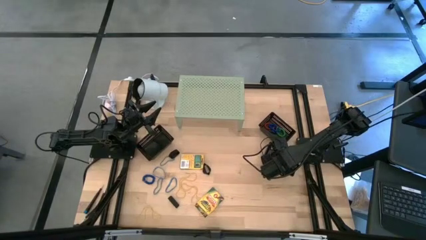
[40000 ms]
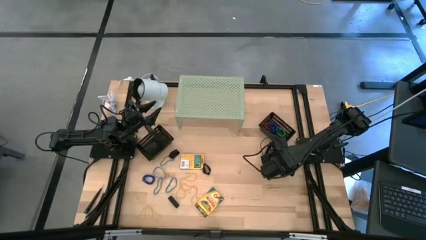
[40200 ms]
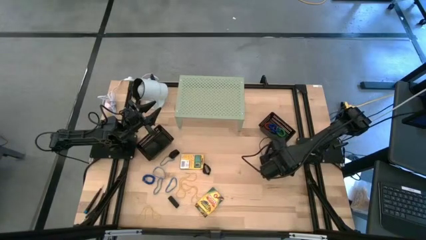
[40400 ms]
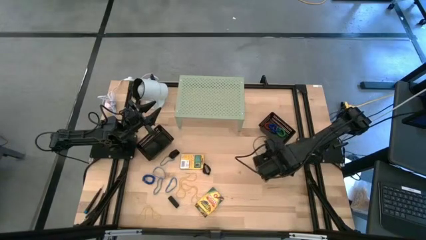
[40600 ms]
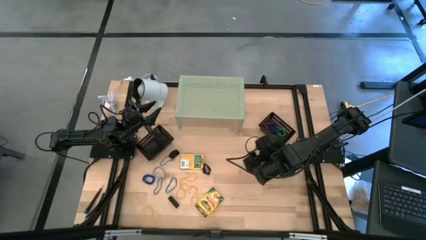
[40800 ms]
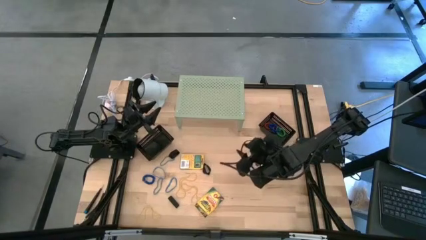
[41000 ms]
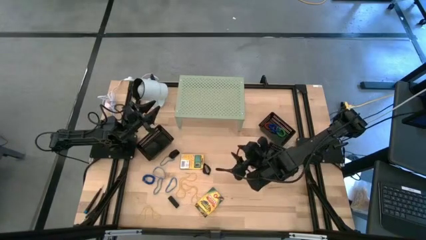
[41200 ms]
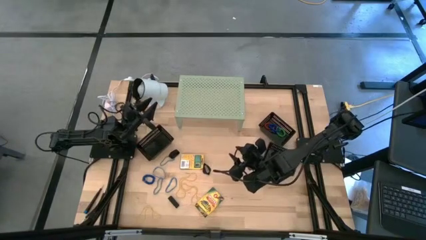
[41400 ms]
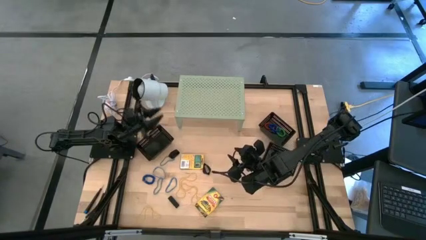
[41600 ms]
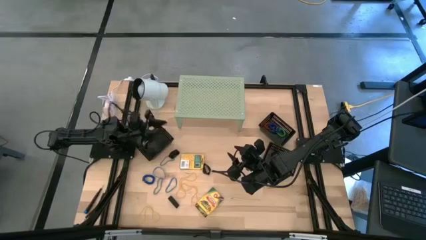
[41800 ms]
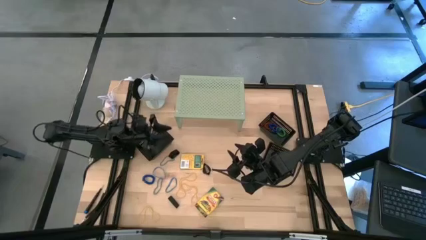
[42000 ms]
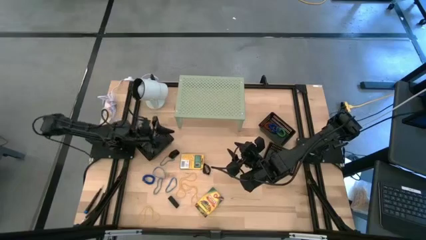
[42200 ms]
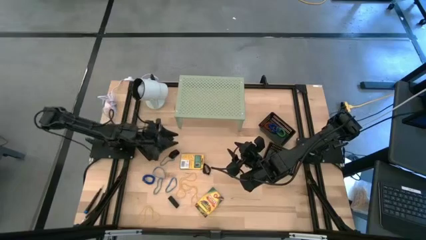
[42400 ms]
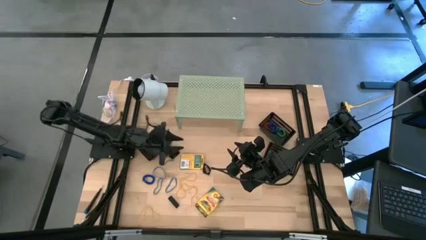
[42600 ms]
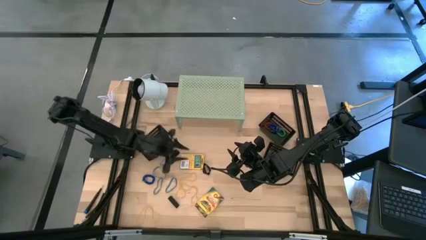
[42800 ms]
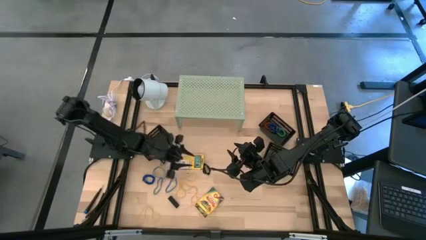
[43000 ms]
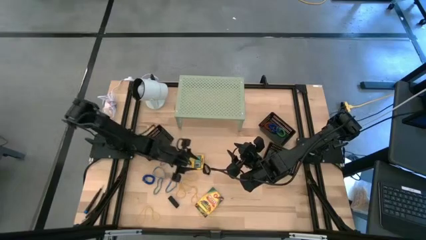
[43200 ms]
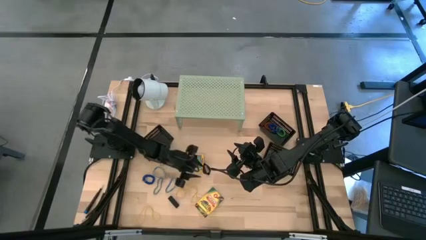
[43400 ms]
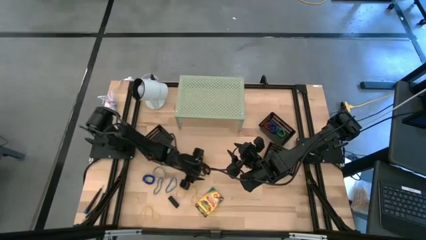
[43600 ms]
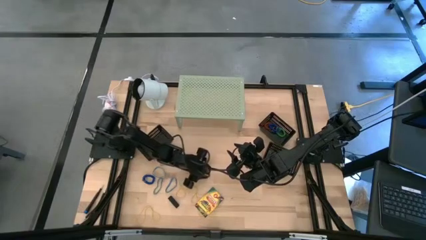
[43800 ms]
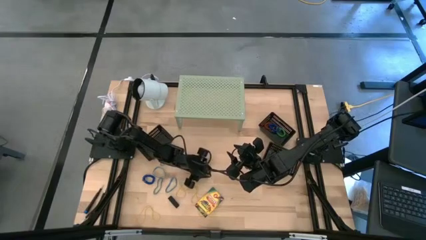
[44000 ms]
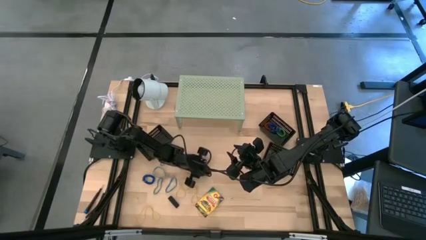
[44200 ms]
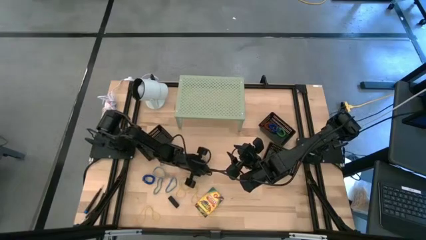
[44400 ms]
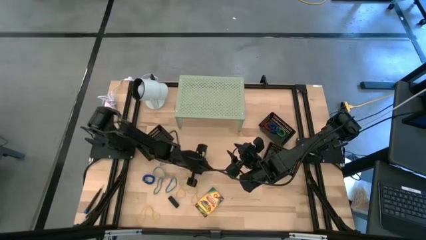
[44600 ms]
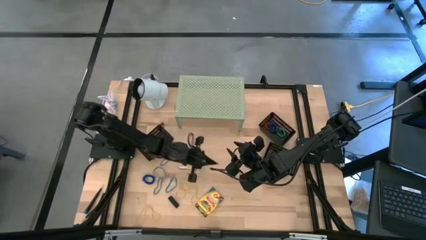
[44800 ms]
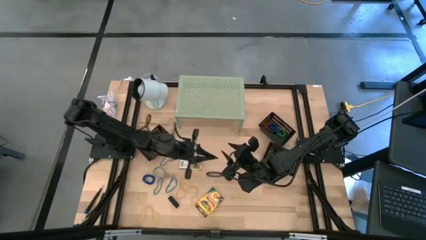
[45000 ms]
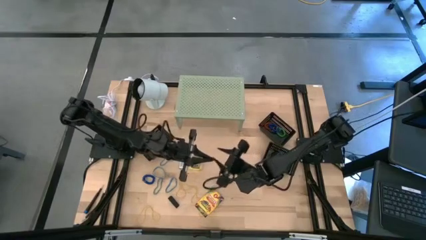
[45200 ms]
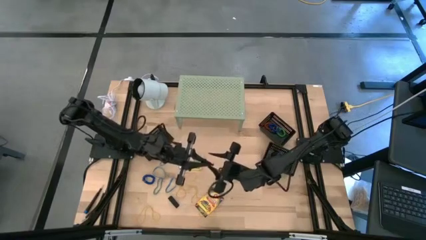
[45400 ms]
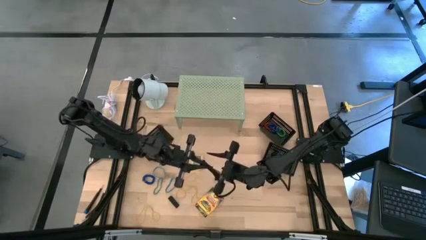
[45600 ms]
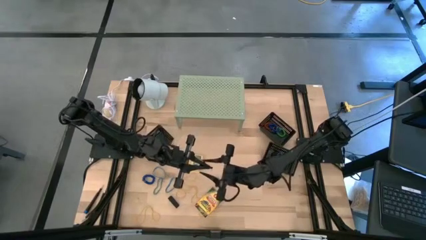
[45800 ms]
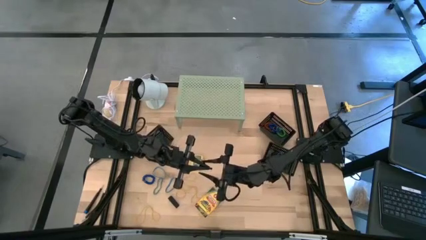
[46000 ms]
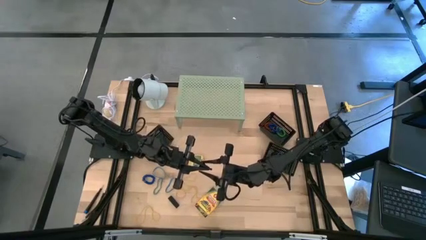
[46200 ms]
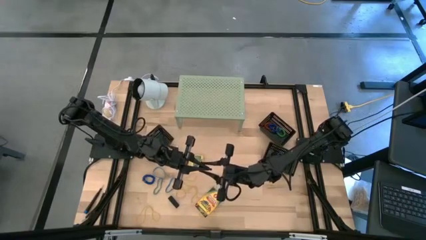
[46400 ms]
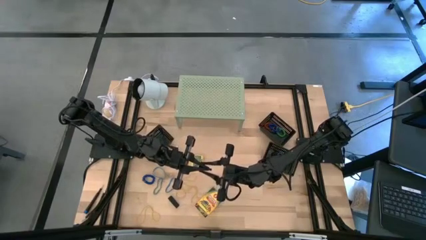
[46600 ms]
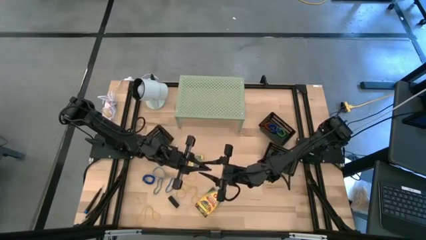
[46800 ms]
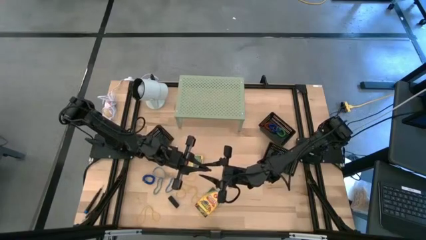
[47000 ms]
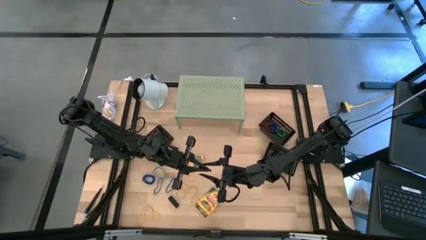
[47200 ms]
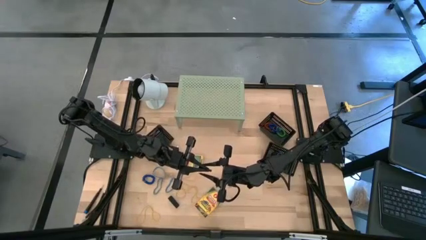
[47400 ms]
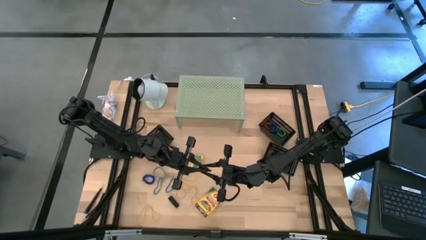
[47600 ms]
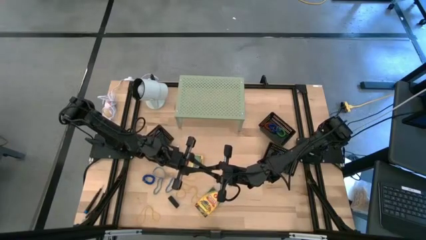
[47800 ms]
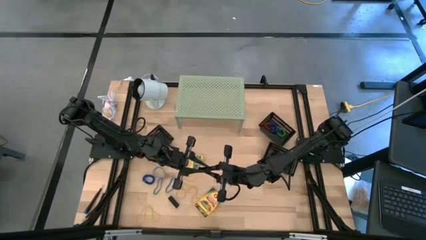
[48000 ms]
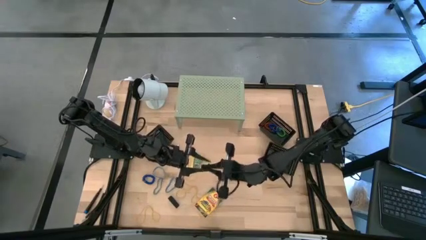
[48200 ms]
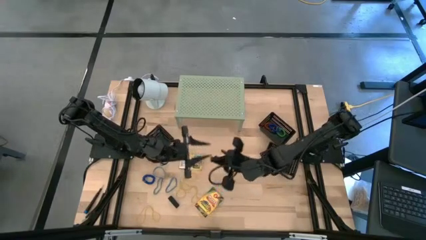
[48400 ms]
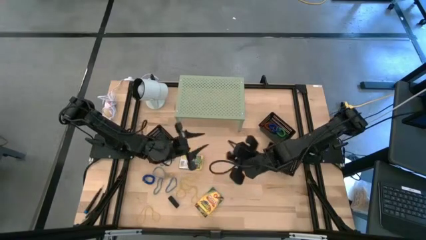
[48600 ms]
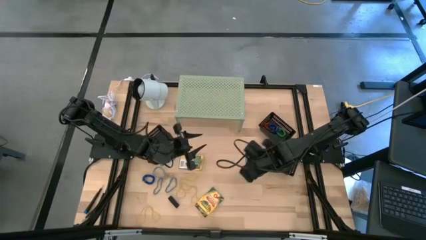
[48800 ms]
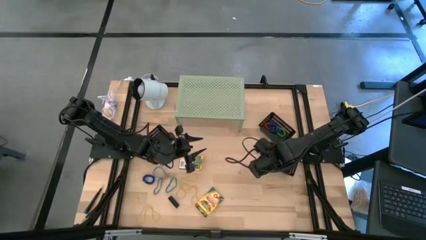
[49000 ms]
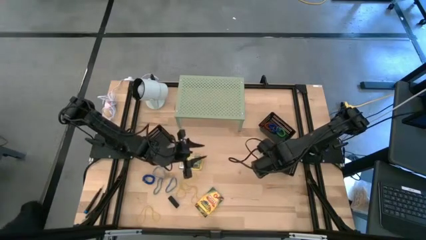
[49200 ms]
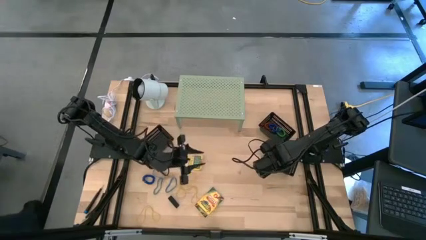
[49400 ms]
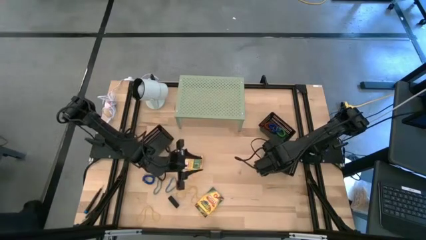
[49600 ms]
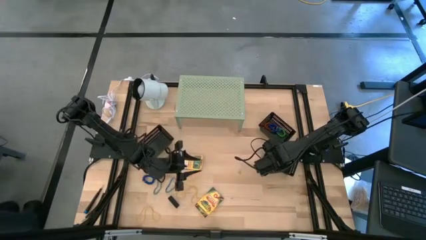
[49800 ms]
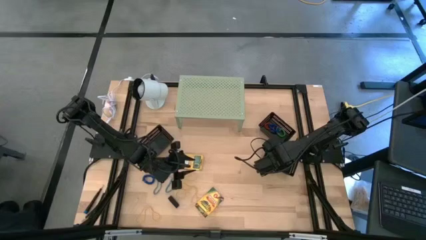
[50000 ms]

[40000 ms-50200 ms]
Task: Pick & Place Office Desk Supplies
Put the black rubber band into the bottom right black bin

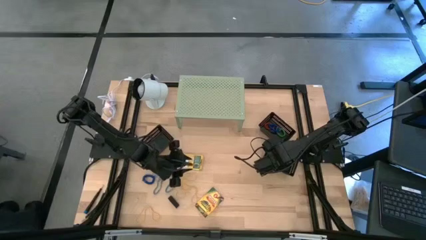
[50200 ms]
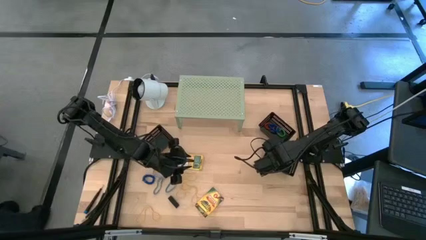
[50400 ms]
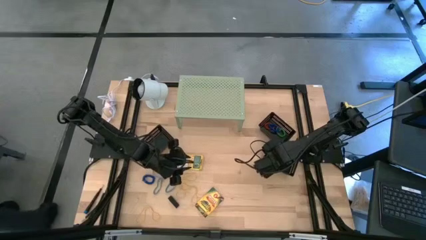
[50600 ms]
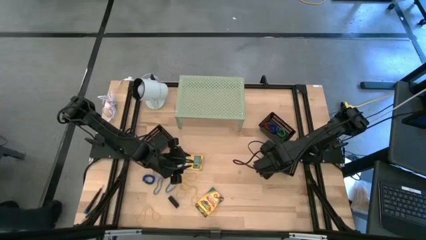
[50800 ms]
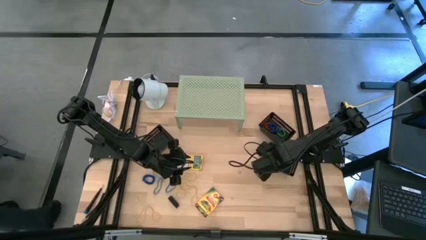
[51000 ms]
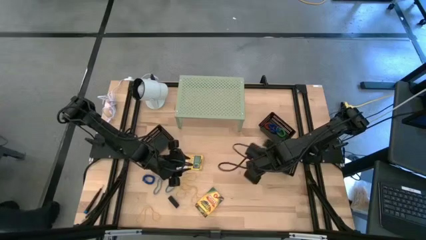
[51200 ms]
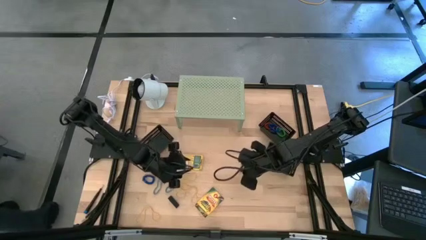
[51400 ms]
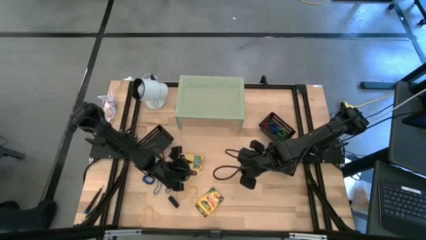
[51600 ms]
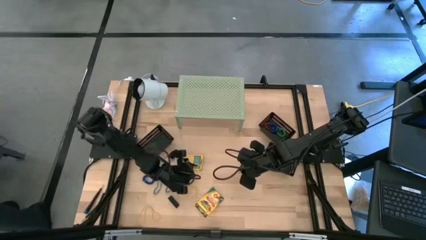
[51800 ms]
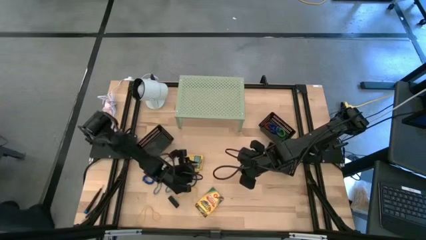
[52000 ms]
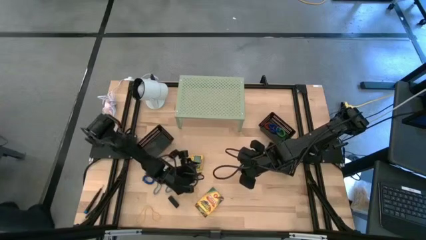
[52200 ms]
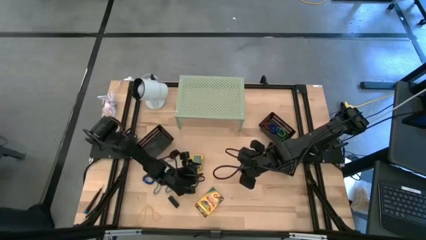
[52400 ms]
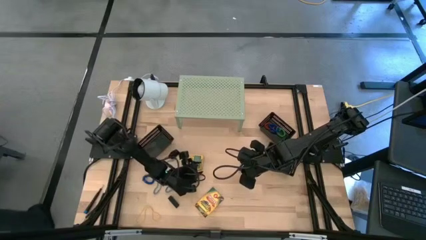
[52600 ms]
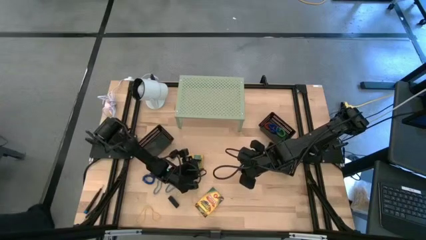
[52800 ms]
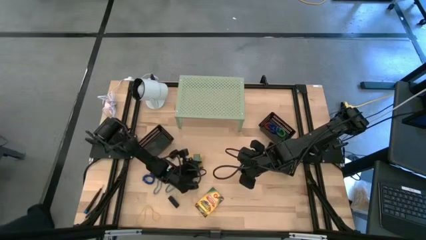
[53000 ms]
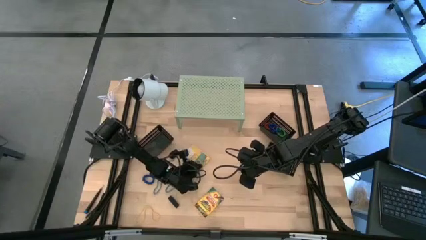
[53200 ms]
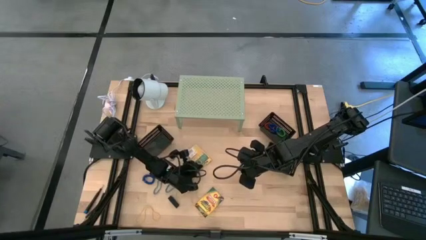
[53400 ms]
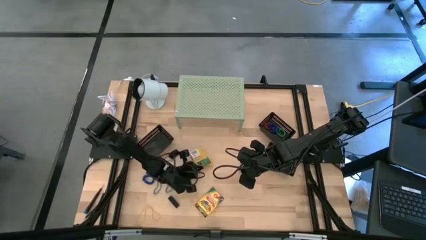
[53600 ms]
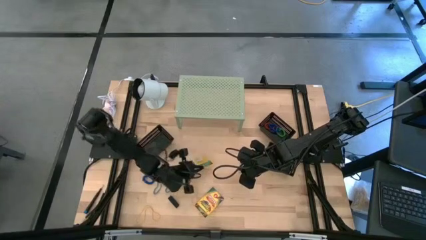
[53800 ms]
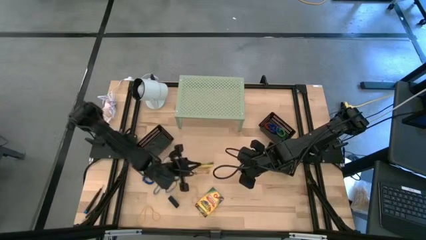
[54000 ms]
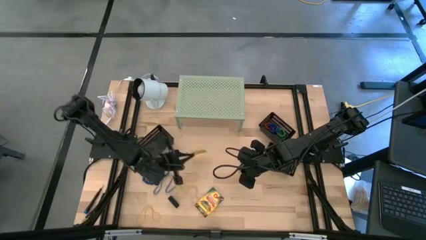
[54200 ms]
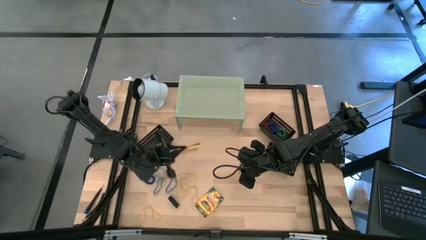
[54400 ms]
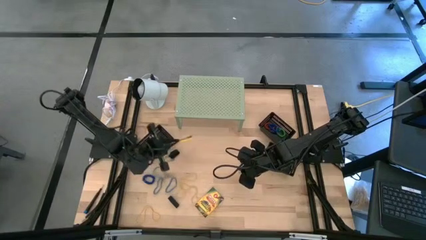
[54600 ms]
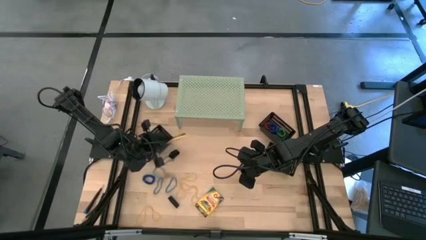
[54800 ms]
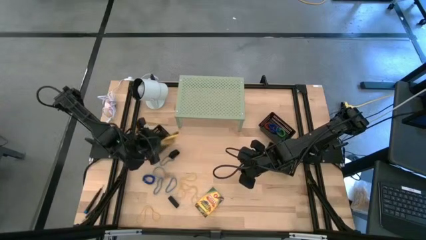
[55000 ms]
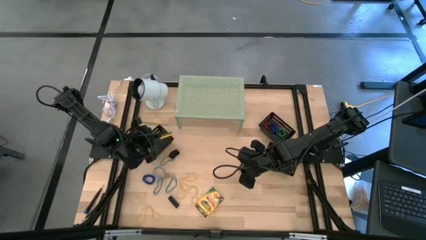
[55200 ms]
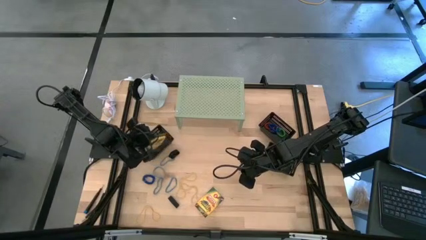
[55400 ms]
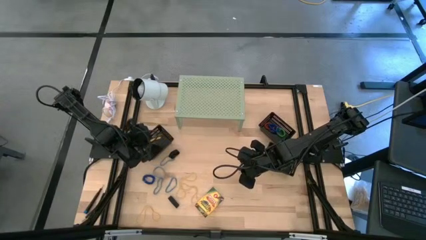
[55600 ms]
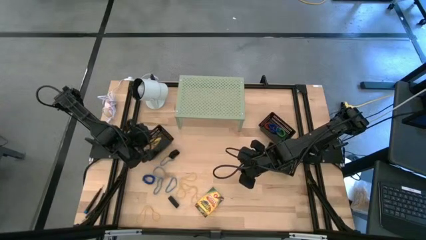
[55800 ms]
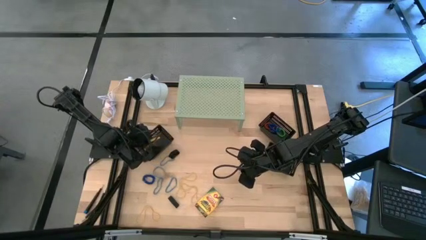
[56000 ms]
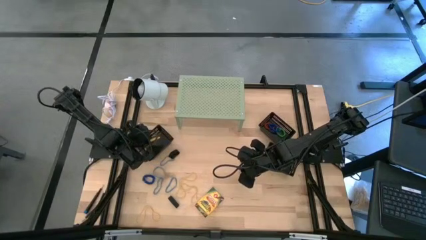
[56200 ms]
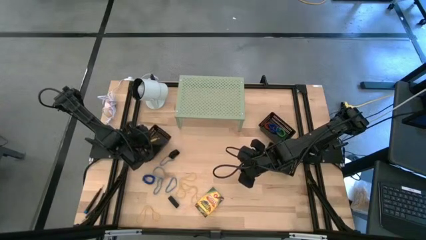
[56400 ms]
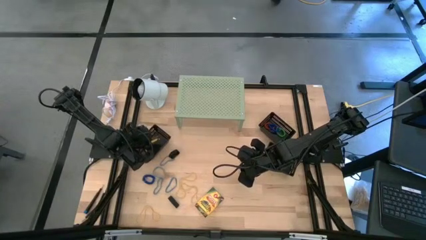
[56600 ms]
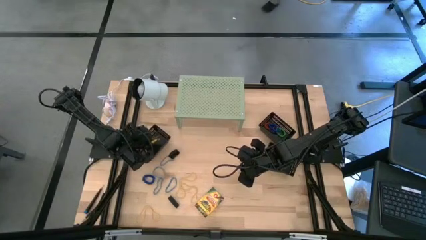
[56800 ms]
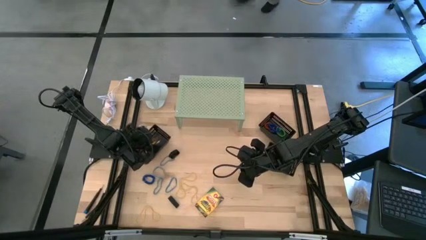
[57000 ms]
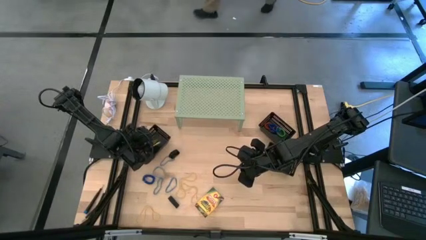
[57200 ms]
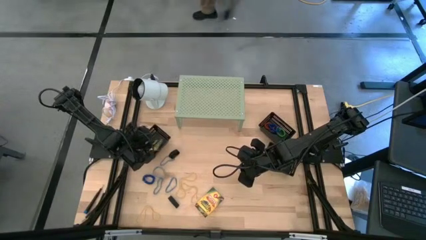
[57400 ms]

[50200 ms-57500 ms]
Put the yellow crayon box into the bottom left black bin
